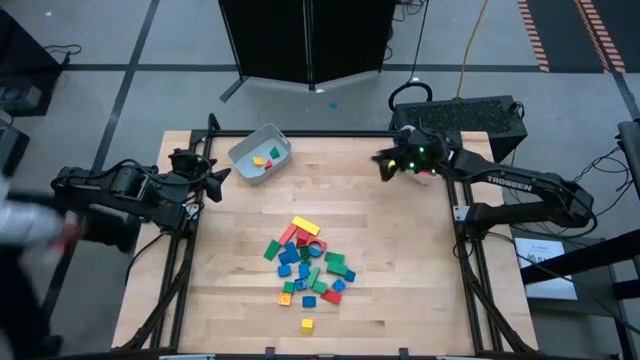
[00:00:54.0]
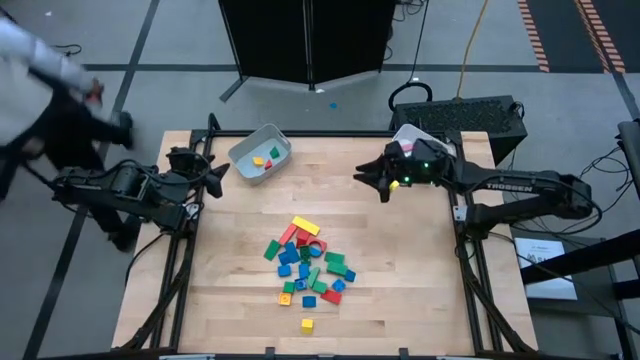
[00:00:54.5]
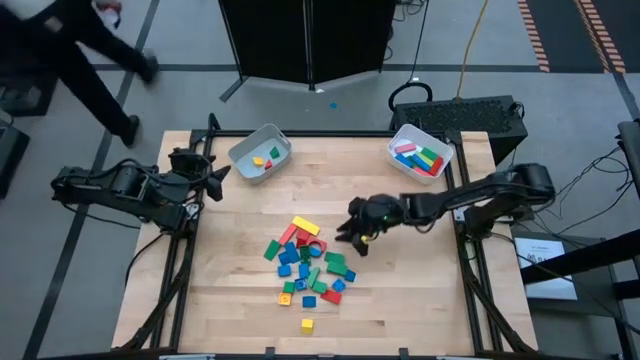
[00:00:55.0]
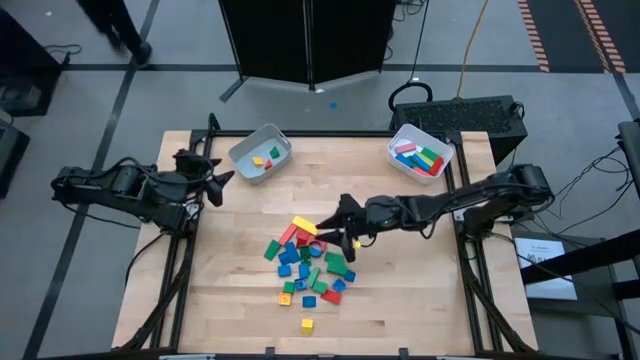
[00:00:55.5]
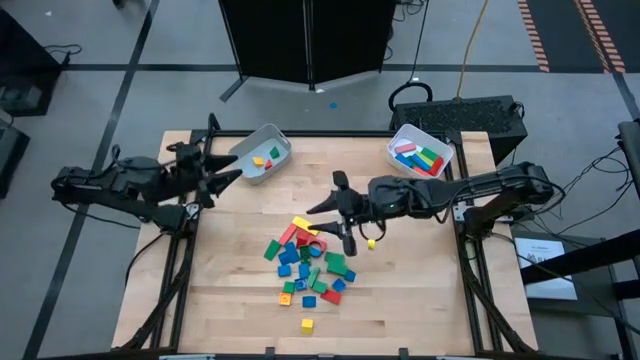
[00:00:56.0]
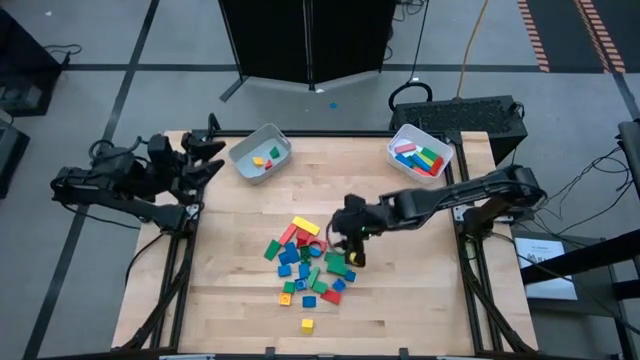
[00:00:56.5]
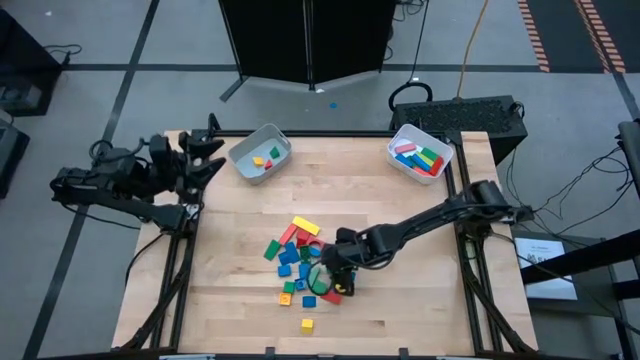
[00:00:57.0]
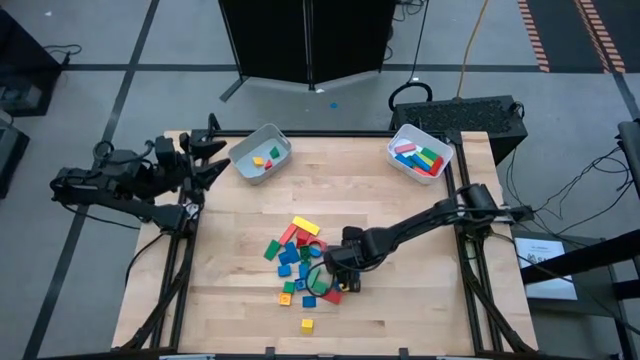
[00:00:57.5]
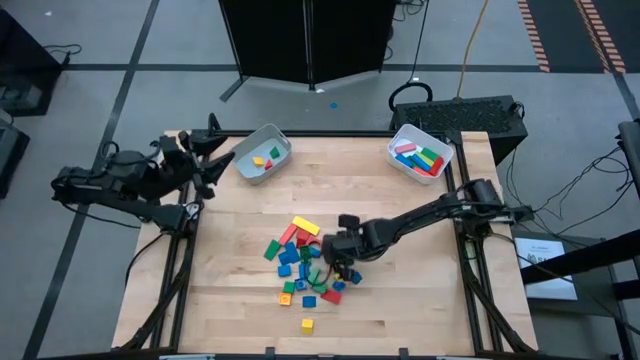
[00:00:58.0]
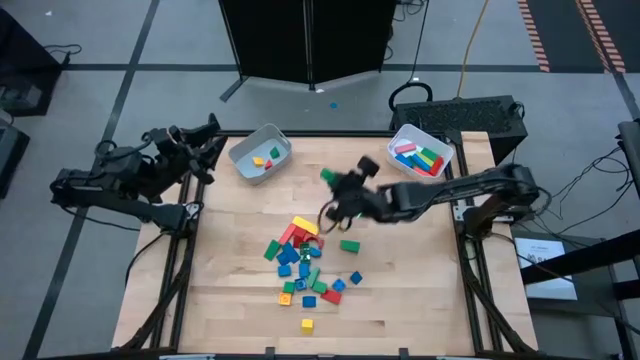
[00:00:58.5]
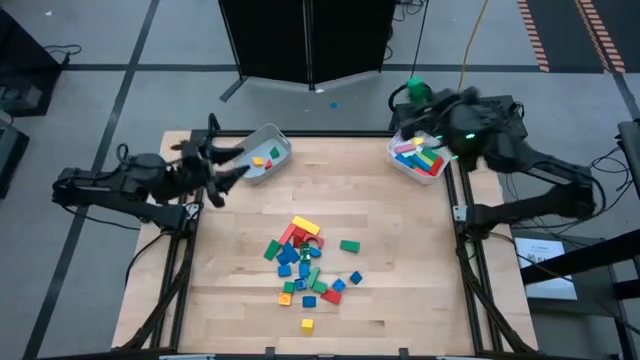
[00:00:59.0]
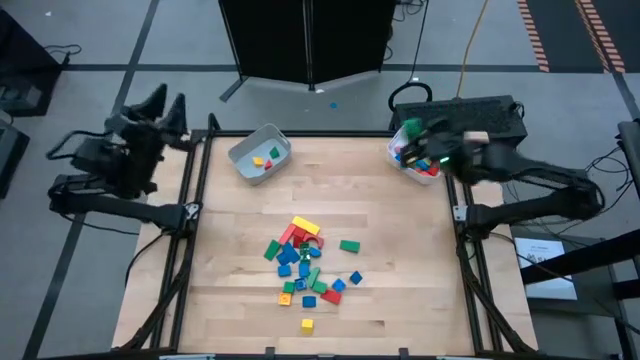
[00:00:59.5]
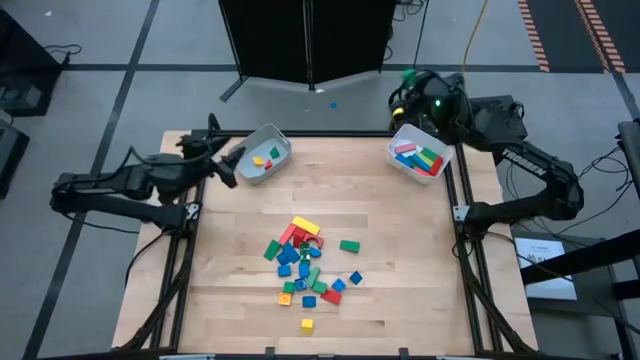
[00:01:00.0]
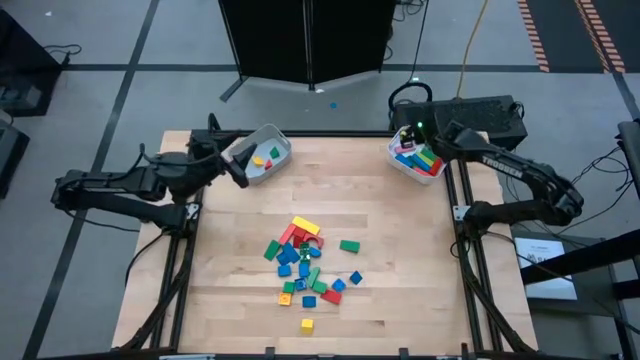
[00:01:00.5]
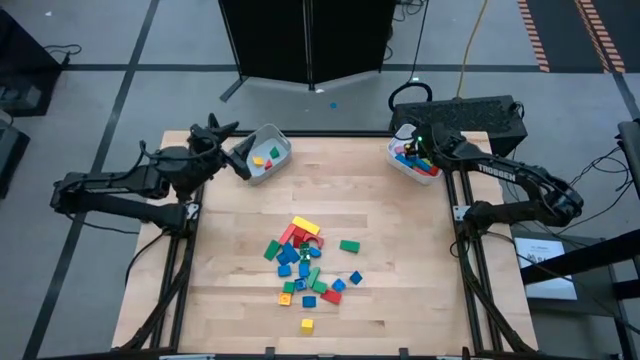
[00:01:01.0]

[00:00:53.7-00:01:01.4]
Task: Sort blocks by size
Put the rectangular green block into the white bin

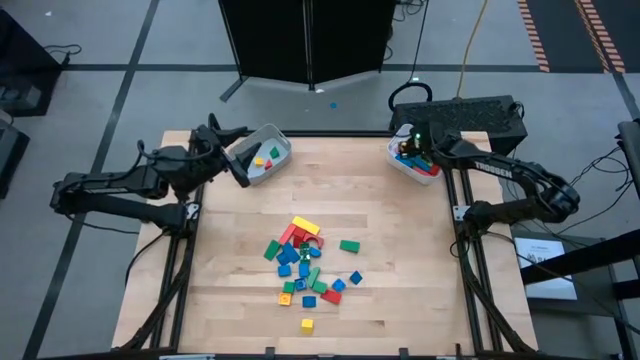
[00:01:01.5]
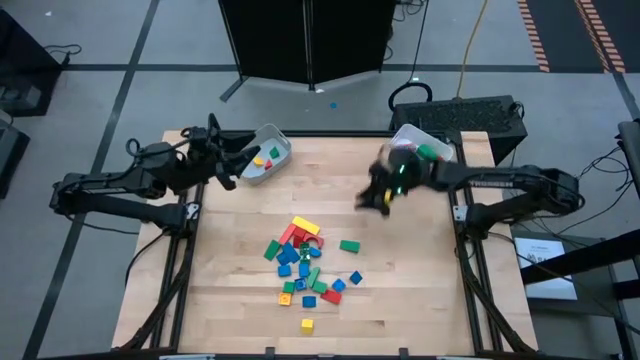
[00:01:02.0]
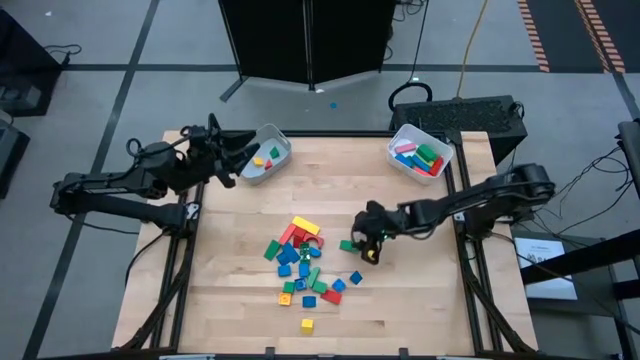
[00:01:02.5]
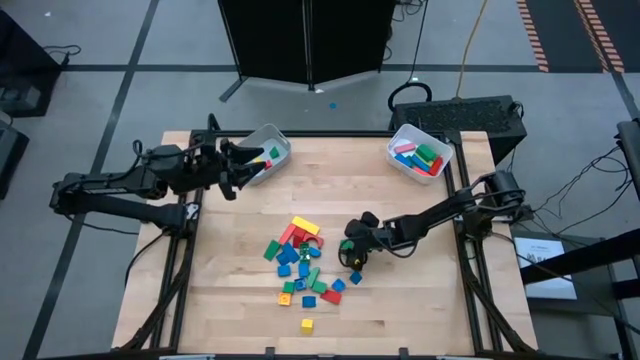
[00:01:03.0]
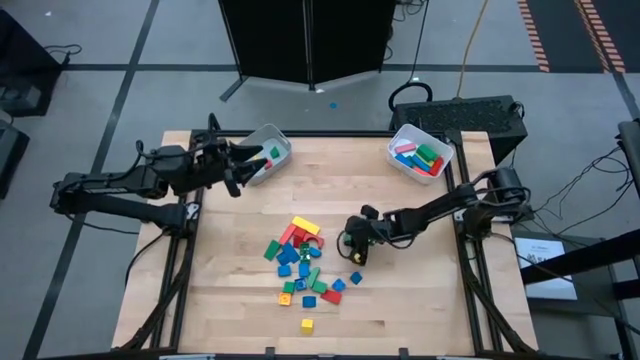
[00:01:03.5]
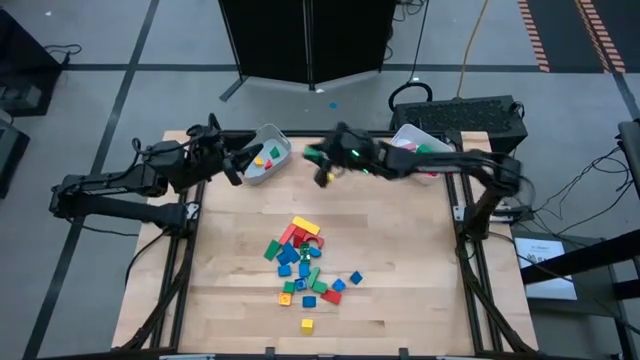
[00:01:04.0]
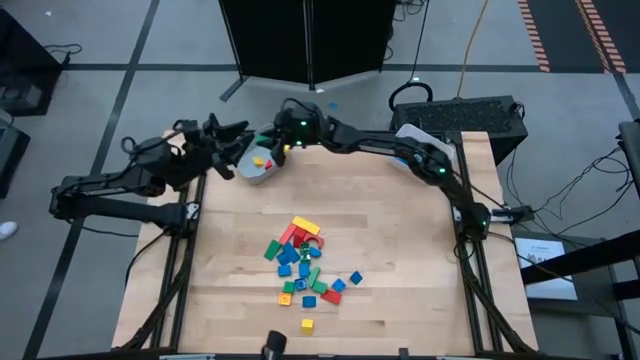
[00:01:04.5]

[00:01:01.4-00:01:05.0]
Put the triangular green block into the gray bin

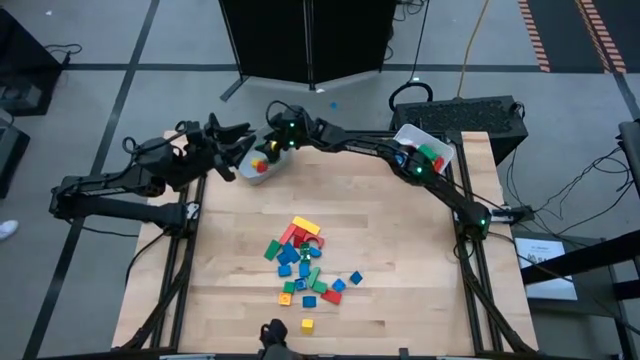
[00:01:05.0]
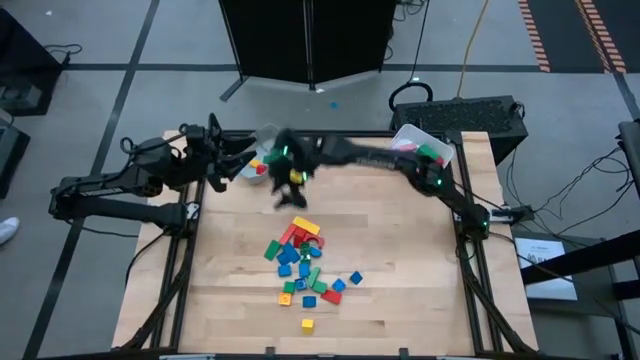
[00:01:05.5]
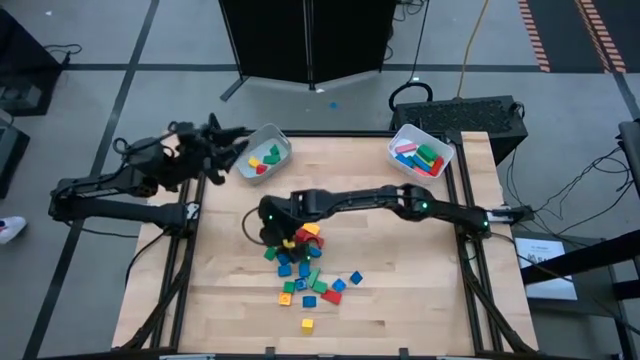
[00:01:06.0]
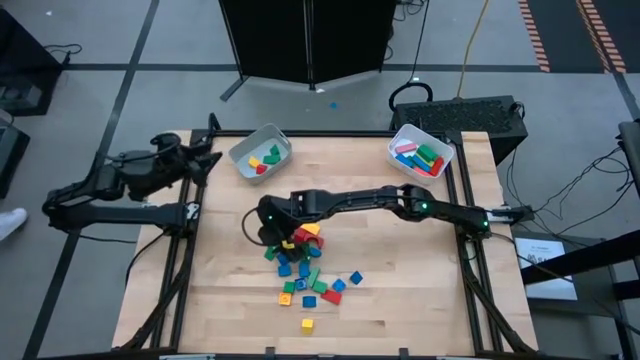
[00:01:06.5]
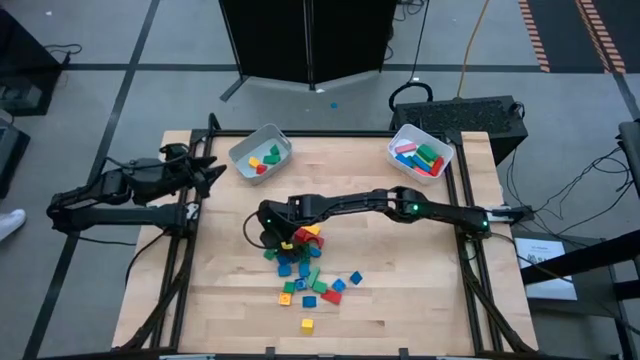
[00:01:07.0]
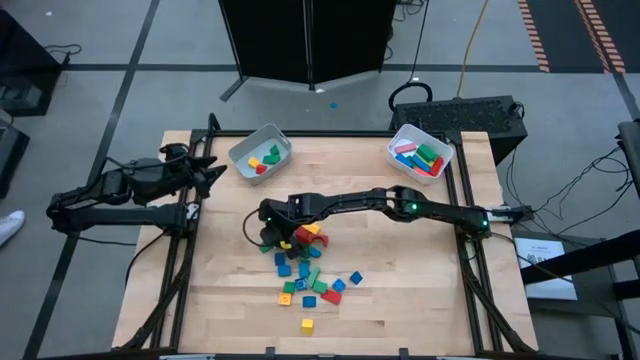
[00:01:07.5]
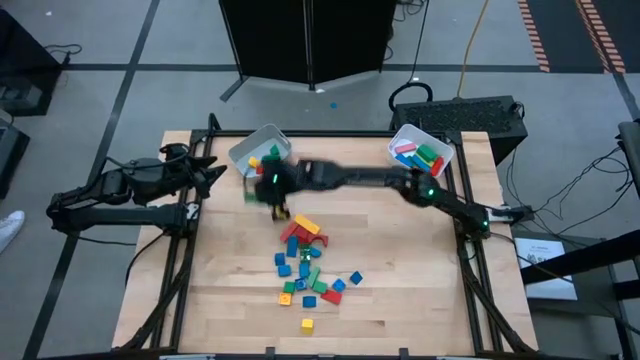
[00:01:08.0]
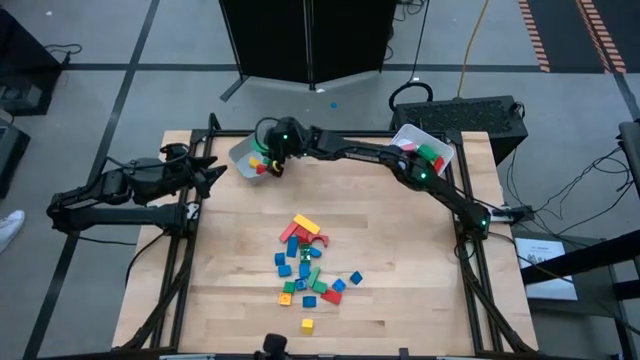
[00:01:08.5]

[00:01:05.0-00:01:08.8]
Put the triangular green block into the gray bin

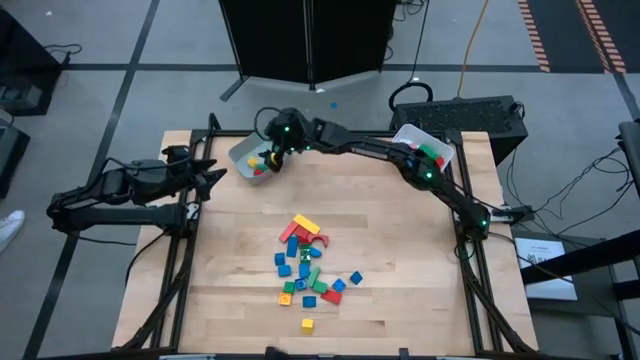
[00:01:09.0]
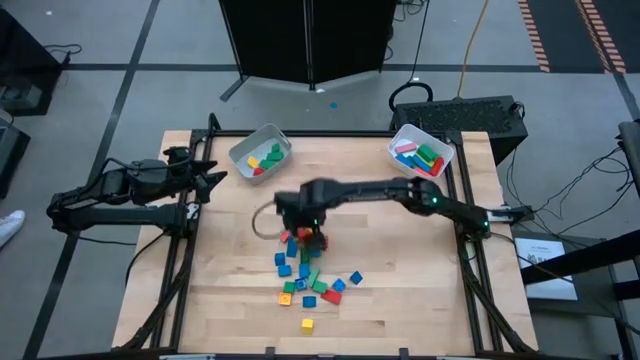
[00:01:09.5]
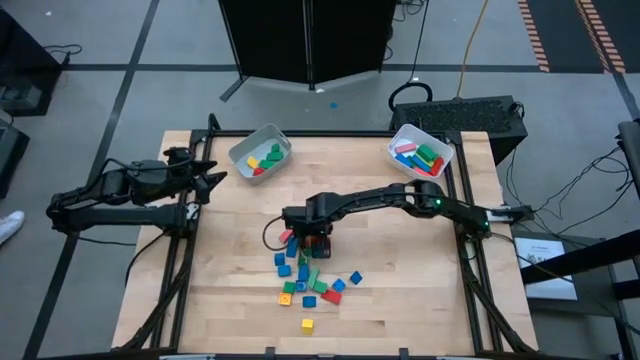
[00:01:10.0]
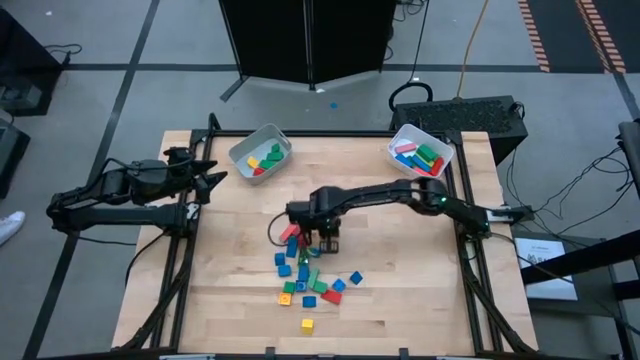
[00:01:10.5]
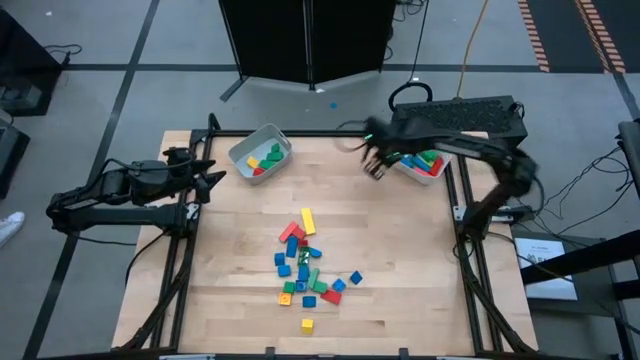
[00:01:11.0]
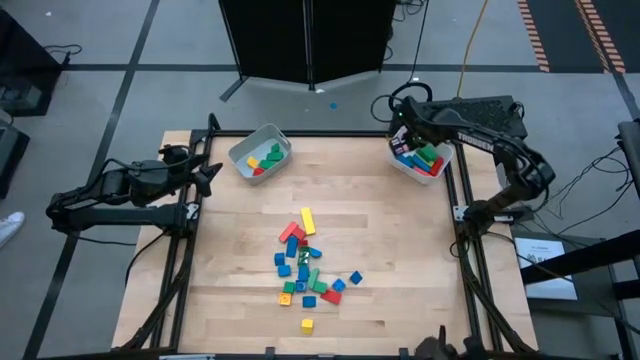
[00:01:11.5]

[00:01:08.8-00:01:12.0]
Put the arch red block into the white bin

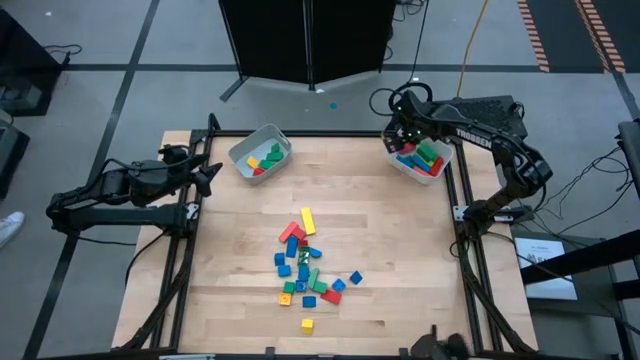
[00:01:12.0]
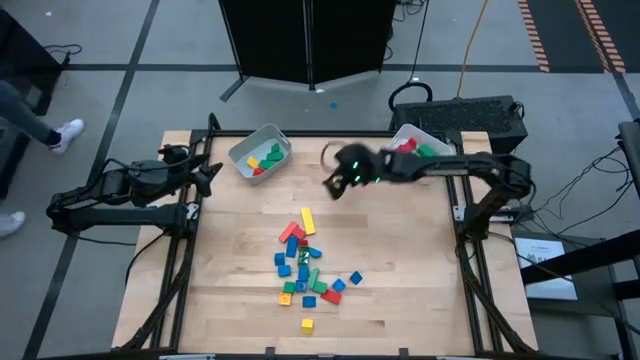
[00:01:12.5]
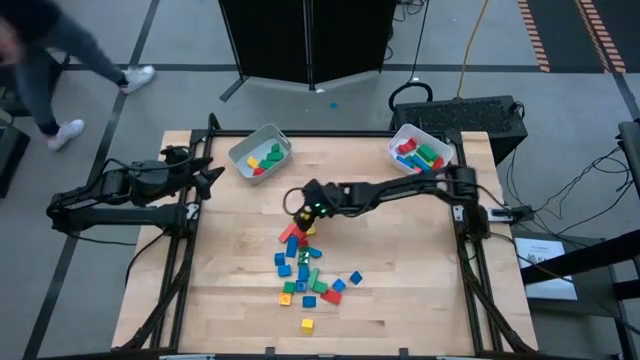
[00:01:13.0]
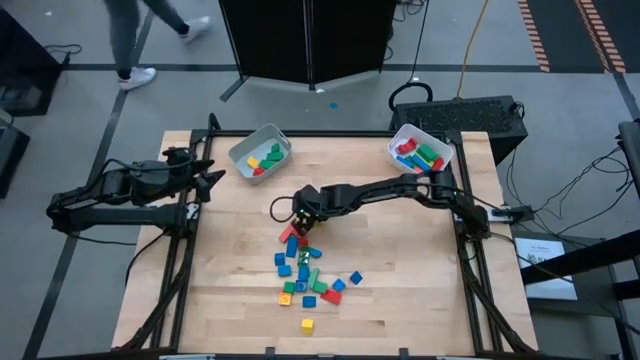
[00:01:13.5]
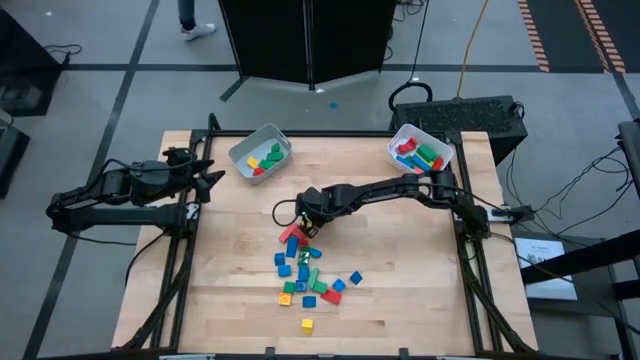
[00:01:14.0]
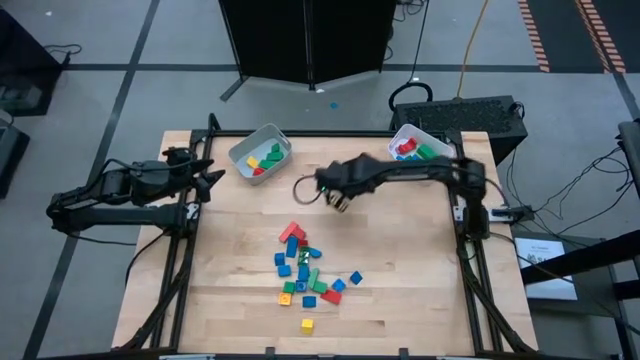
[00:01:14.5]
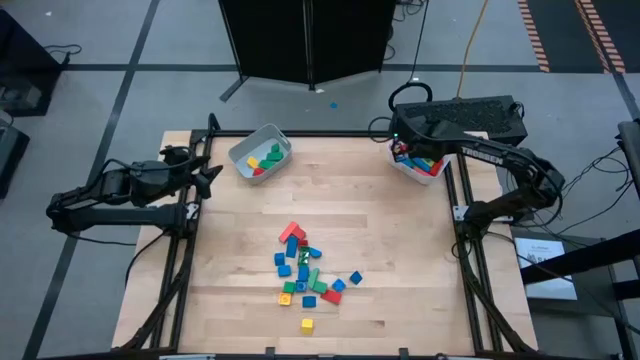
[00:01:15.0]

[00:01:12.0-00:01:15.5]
Put the rectangular yellow block into the white bin

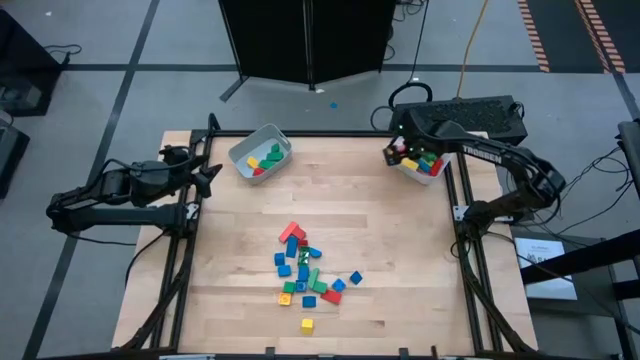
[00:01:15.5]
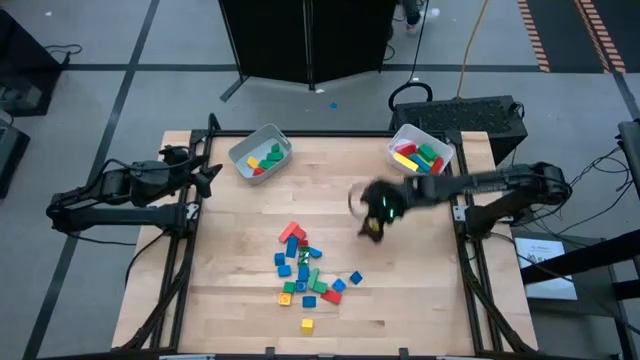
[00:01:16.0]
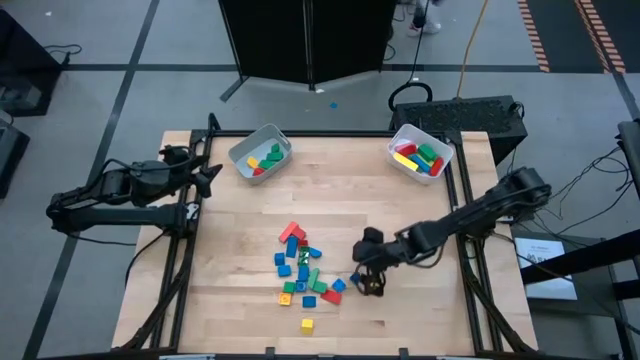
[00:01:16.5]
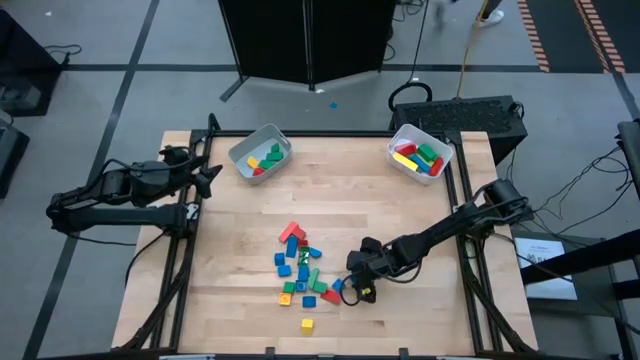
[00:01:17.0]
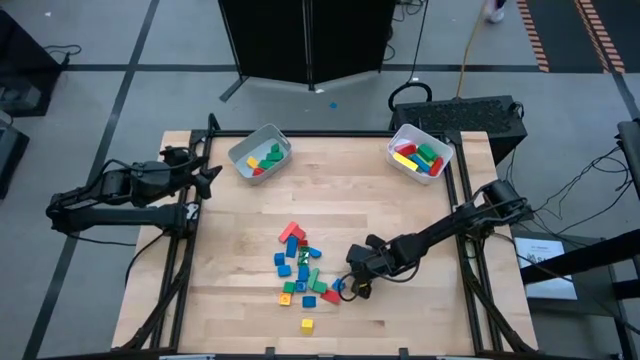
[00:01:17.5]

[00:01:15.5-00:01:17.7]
Put the triangular blue block into the gray bin
